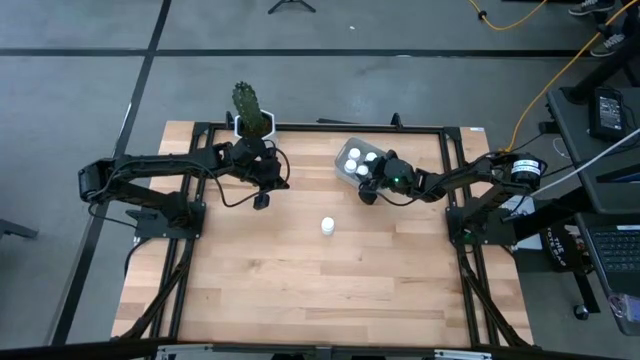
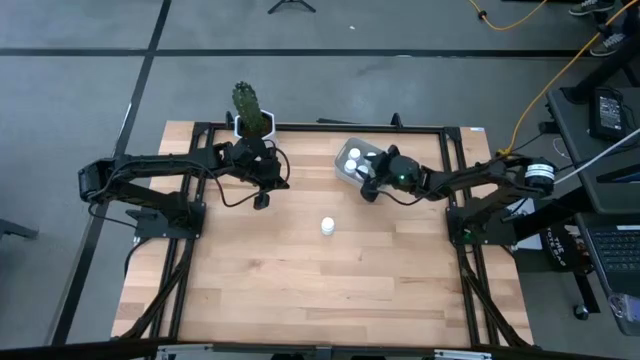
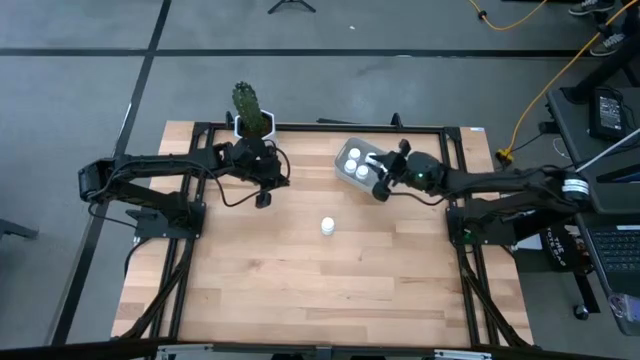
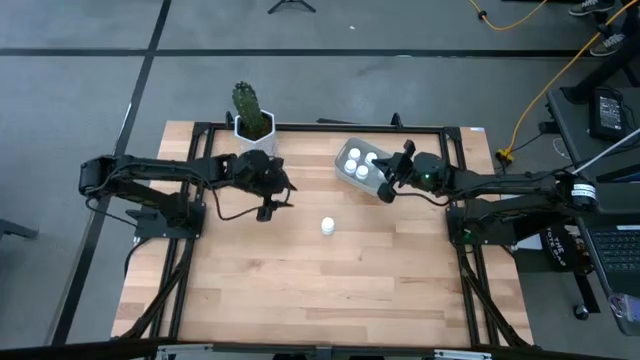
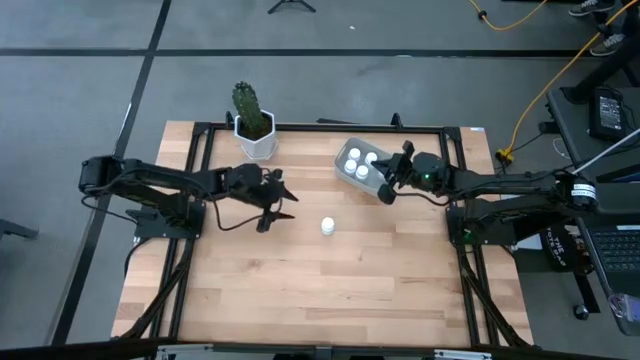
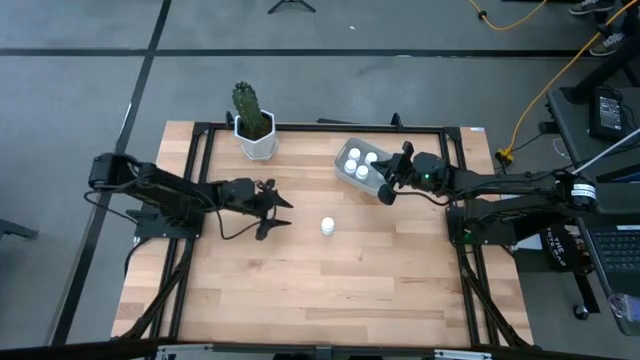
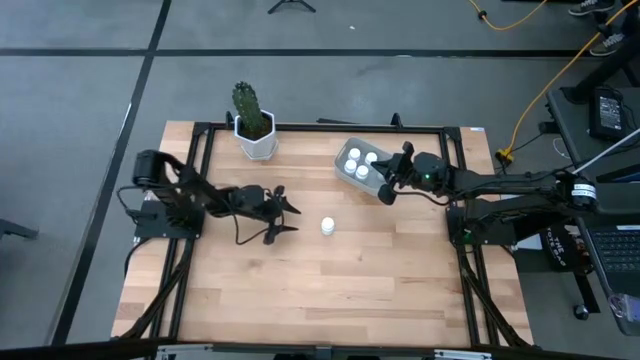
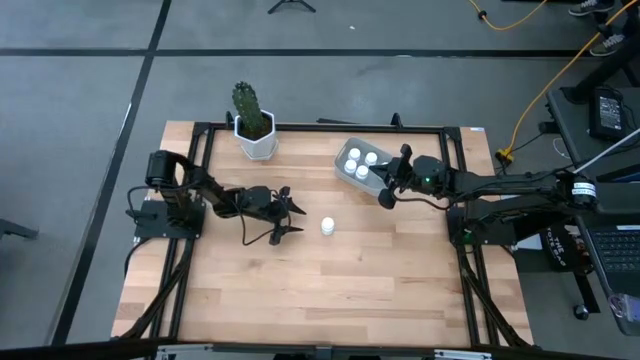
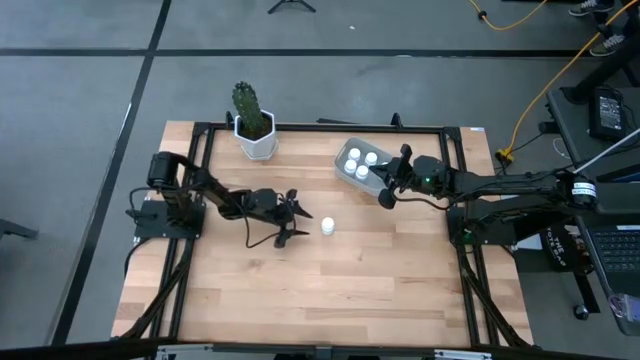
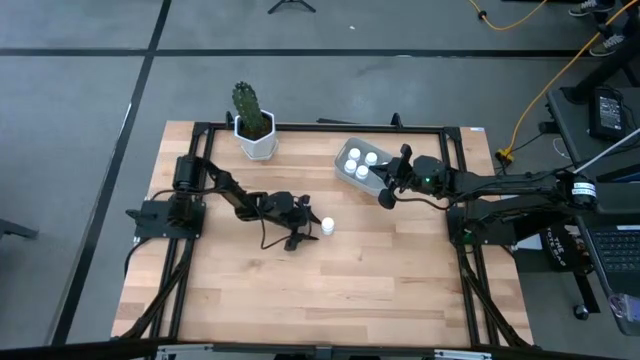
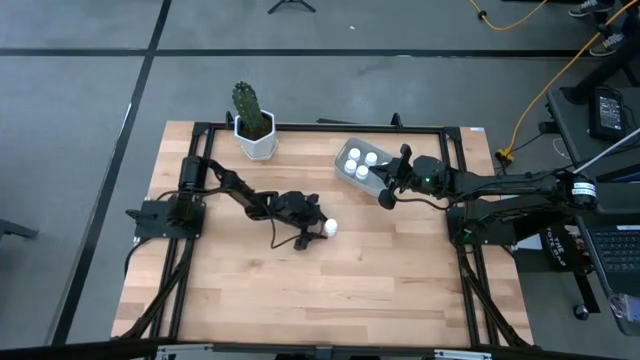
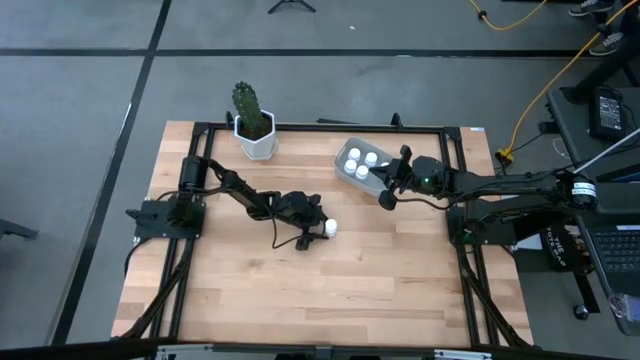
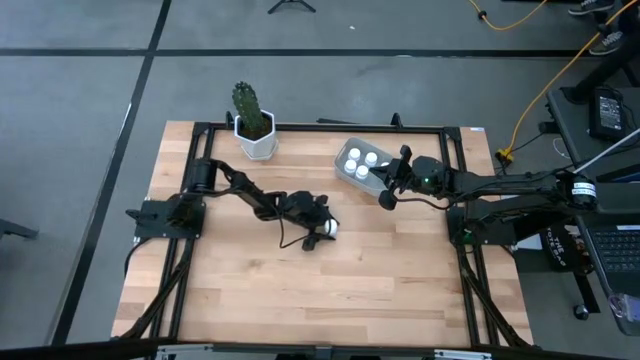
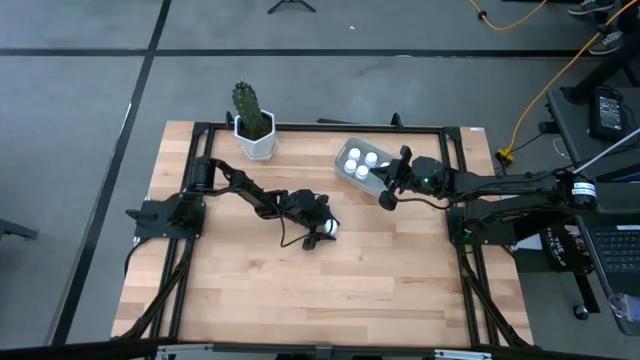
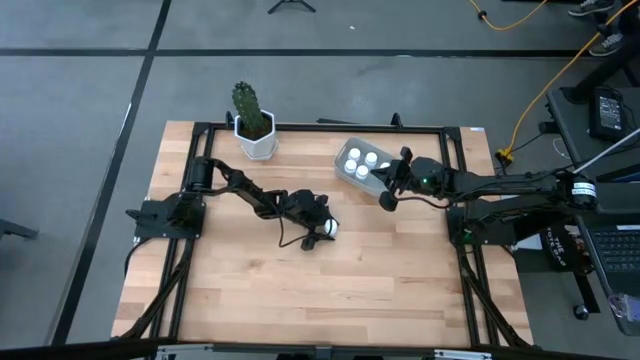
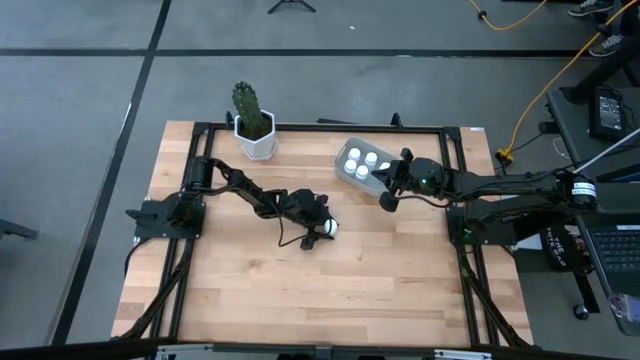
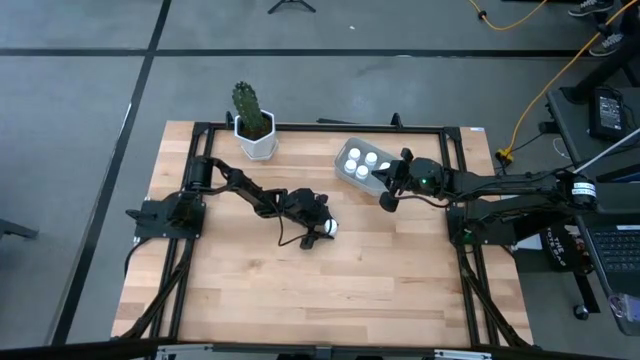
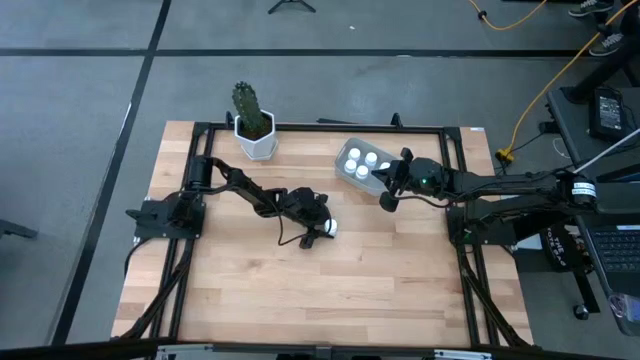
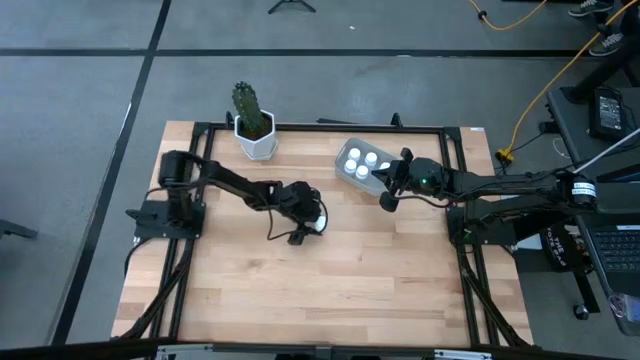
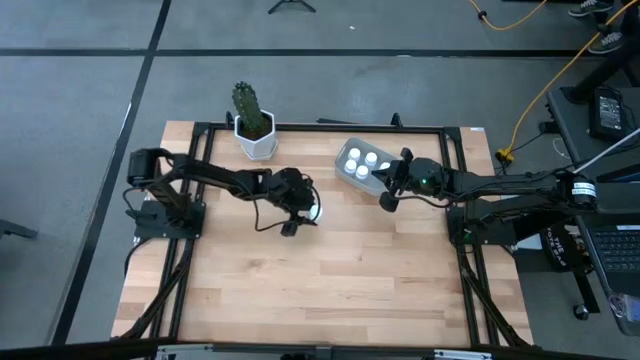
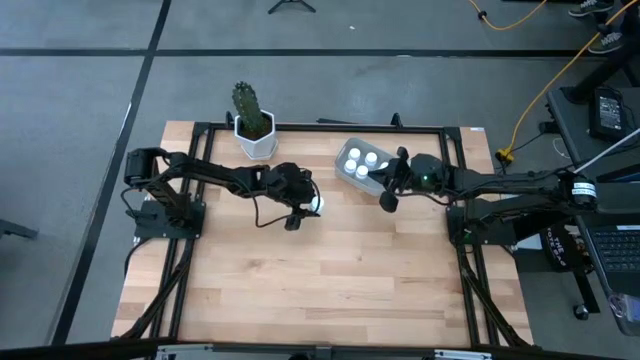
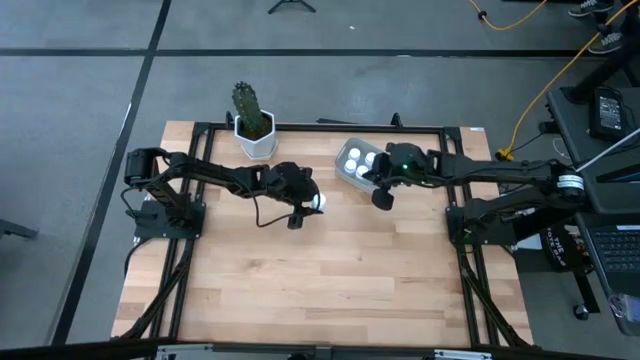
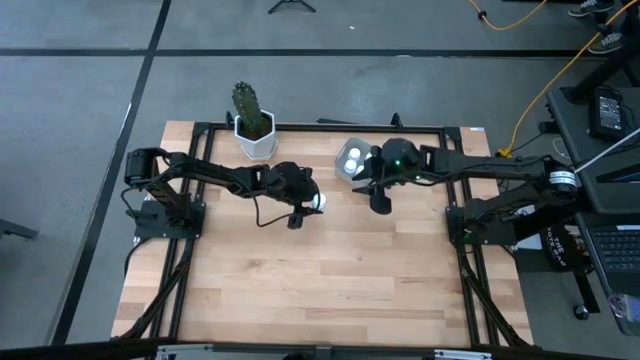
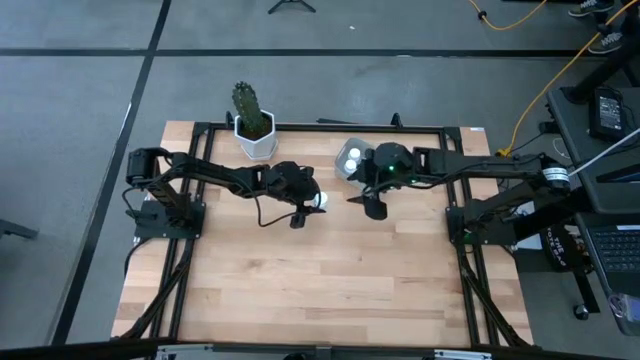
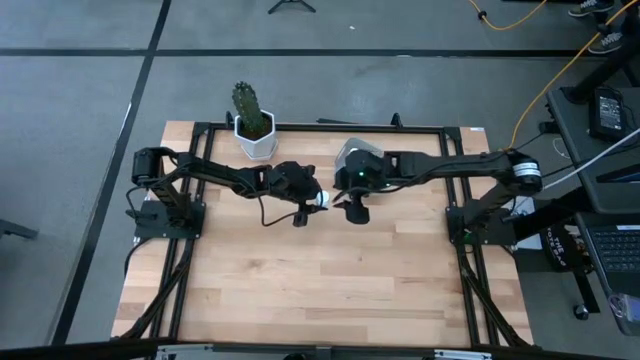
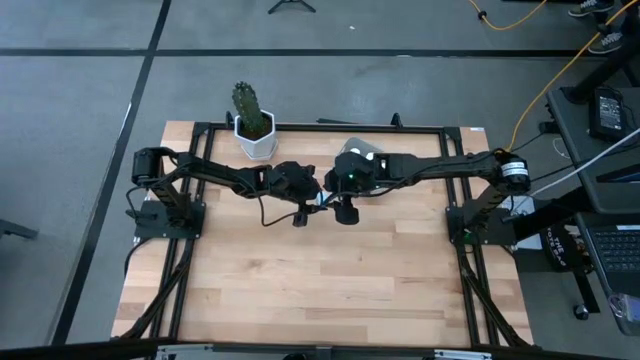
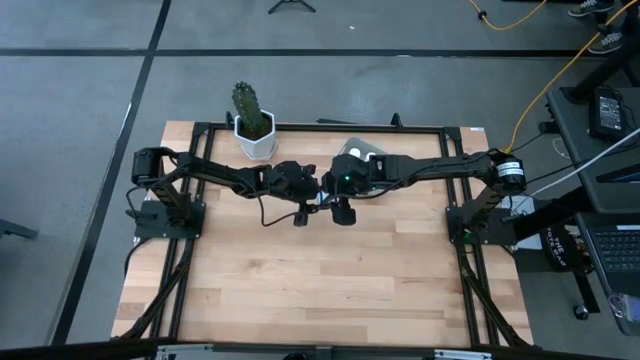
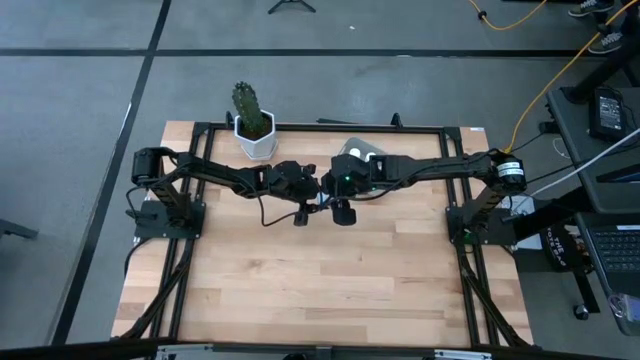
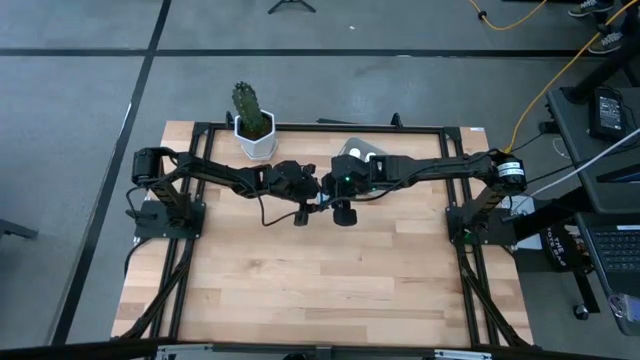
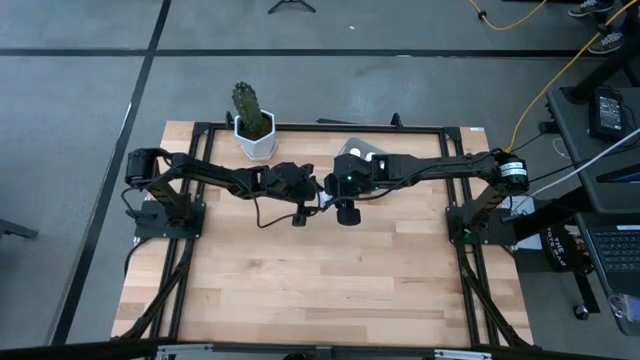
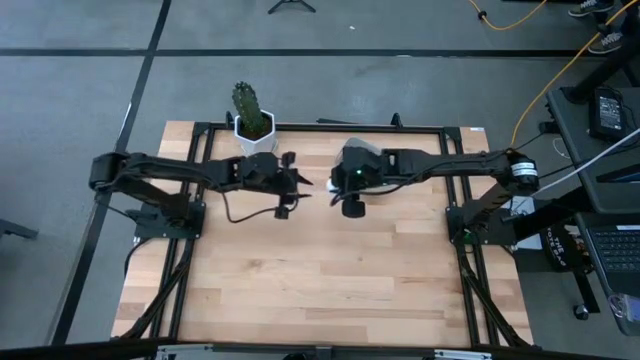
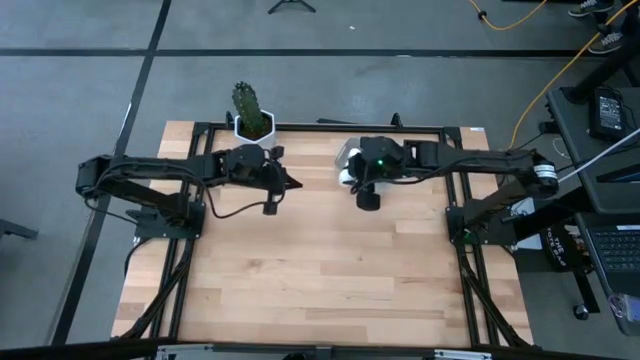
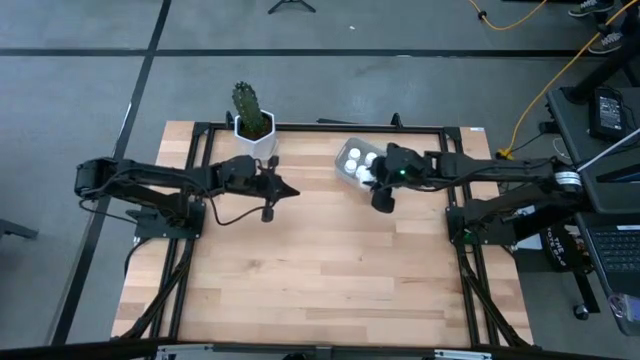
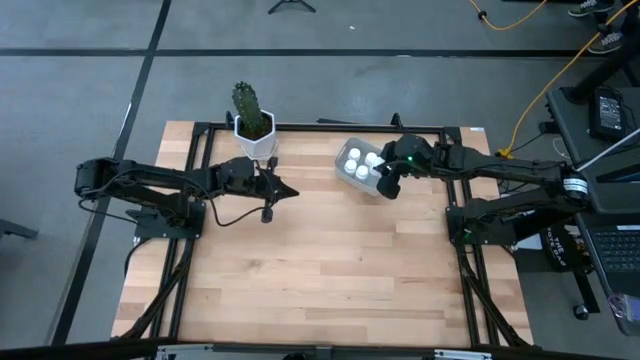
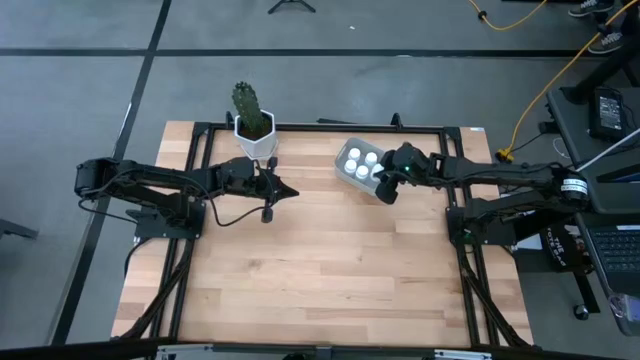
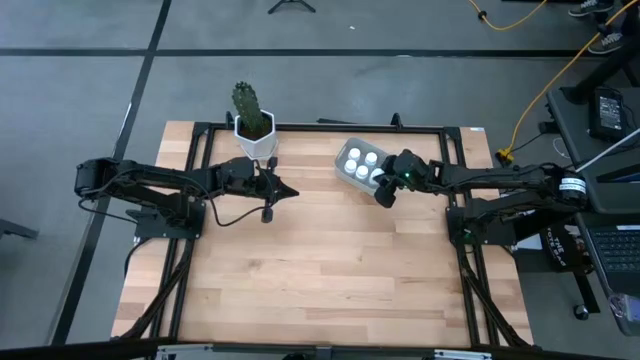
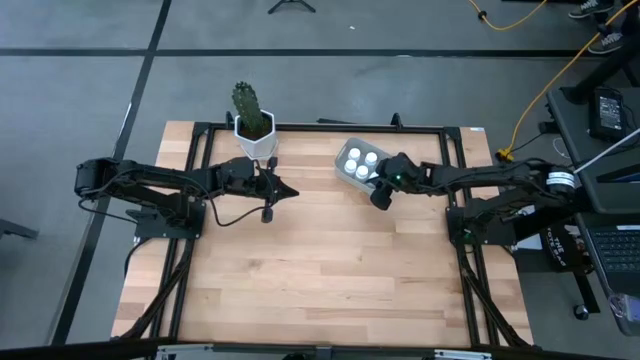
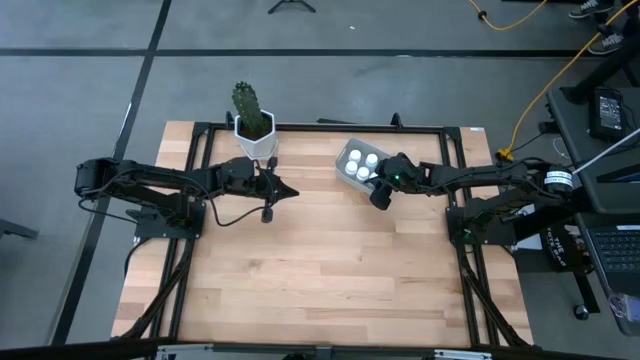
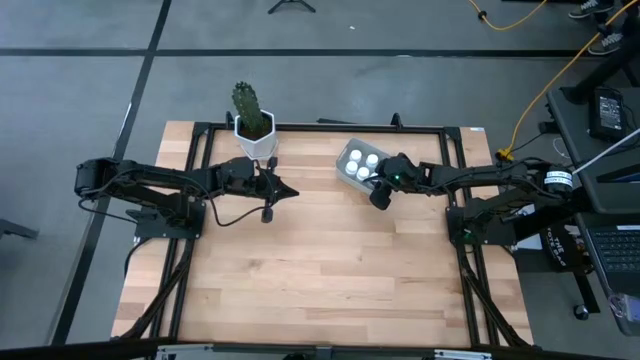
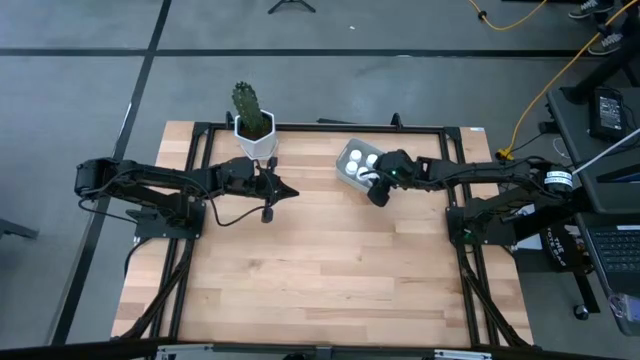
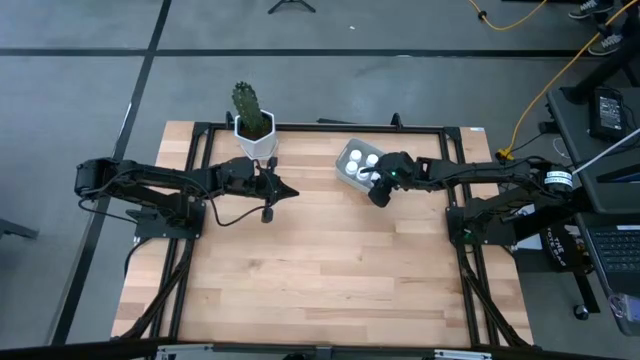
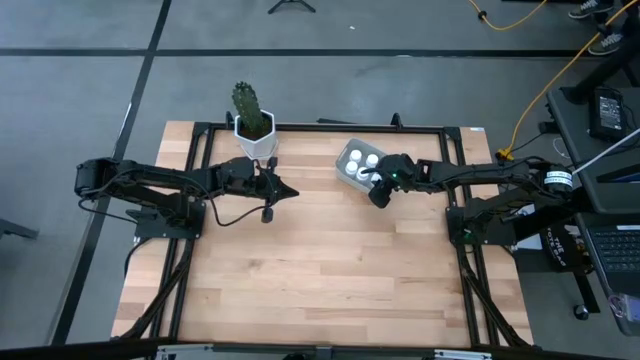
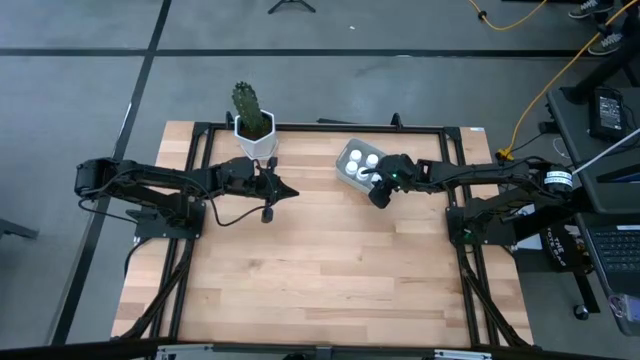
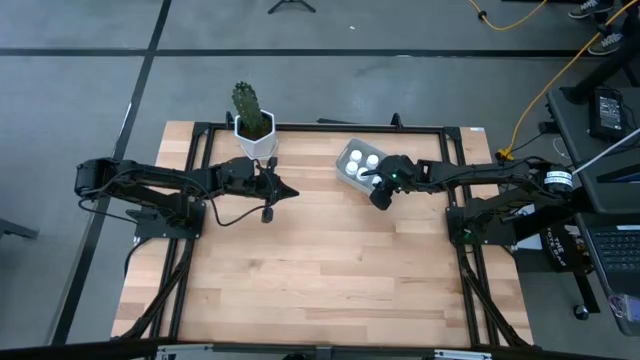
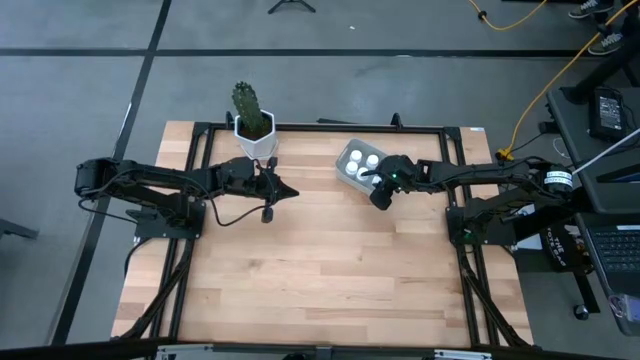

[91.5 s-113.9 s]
Task: Pick and place pill bottles into a basket
Put the white pill bottle into the gray bin
